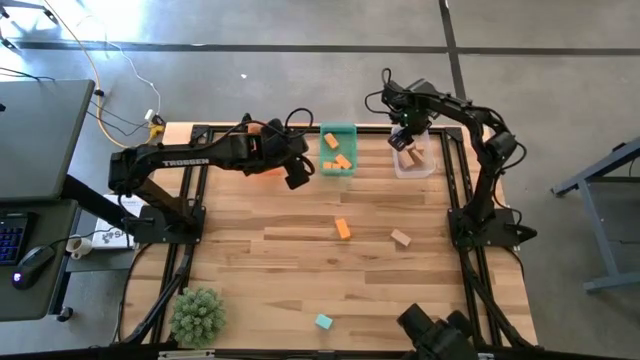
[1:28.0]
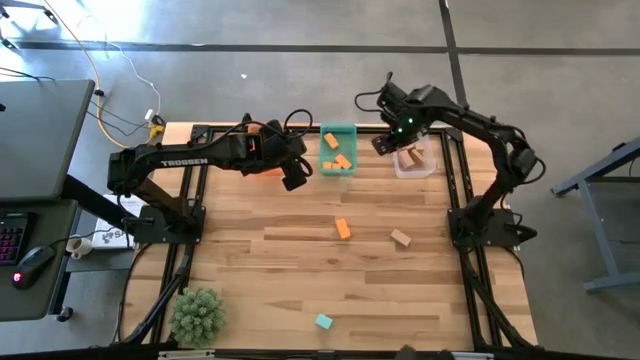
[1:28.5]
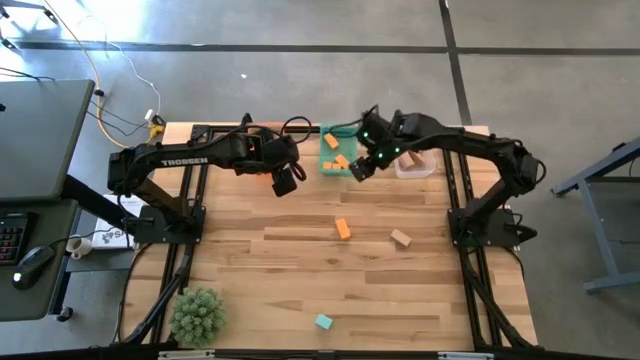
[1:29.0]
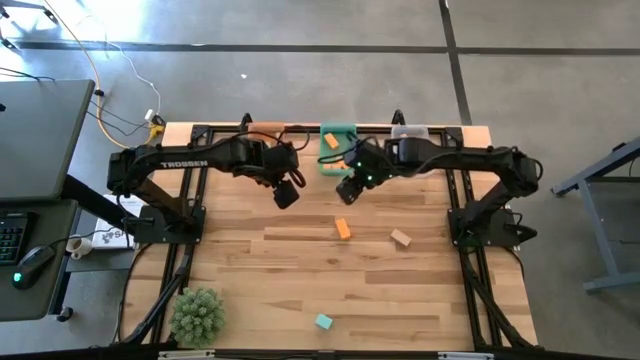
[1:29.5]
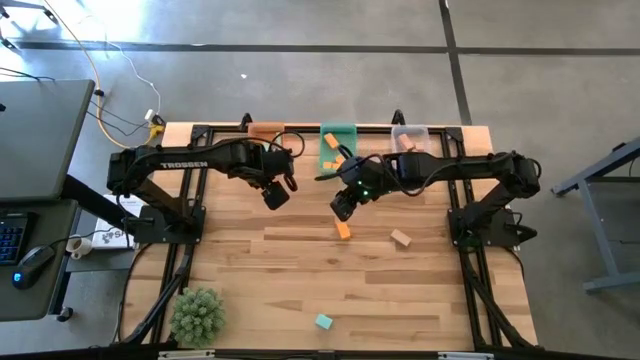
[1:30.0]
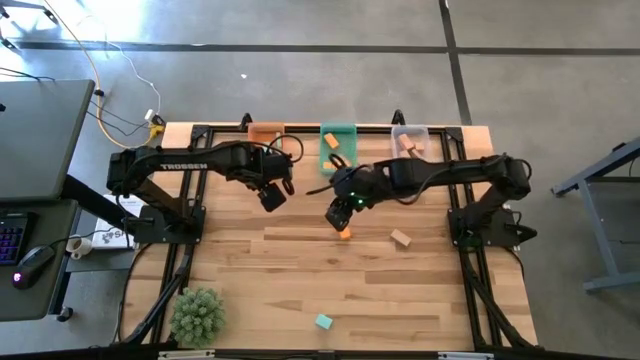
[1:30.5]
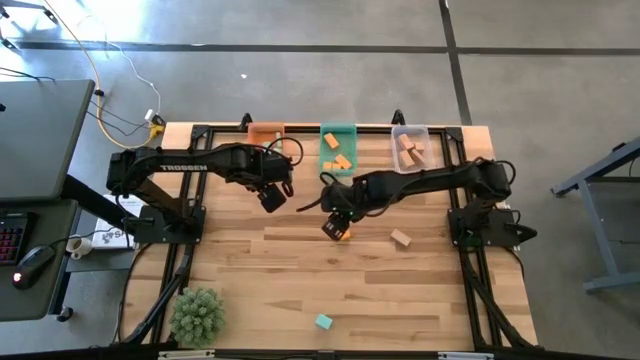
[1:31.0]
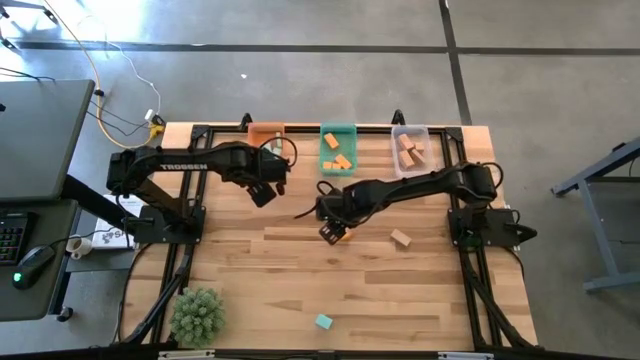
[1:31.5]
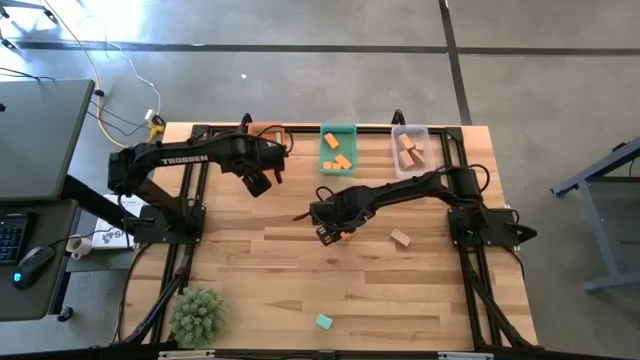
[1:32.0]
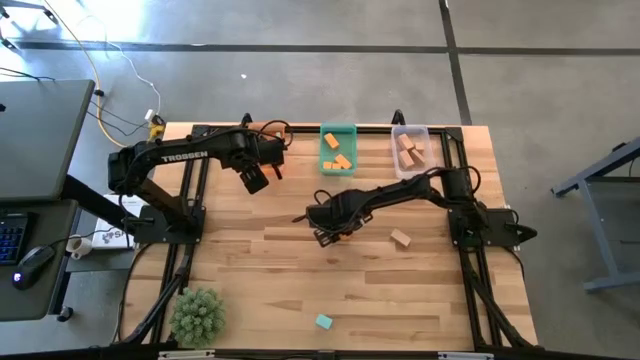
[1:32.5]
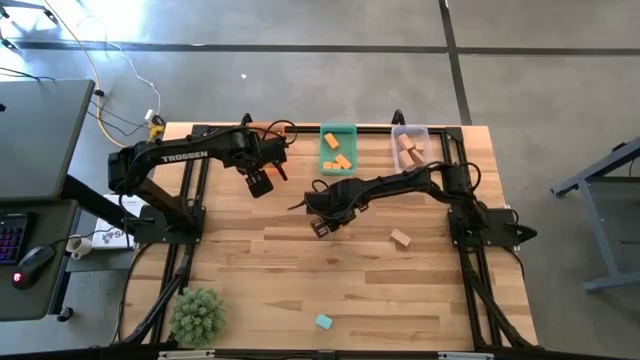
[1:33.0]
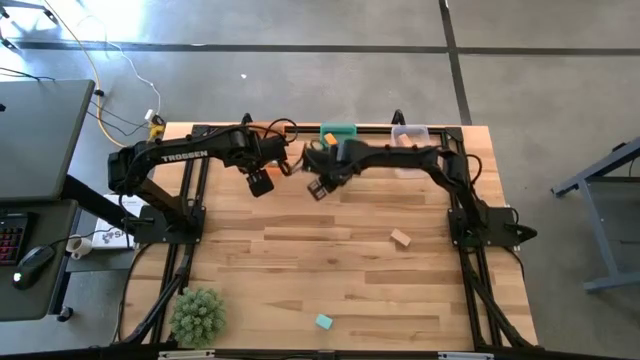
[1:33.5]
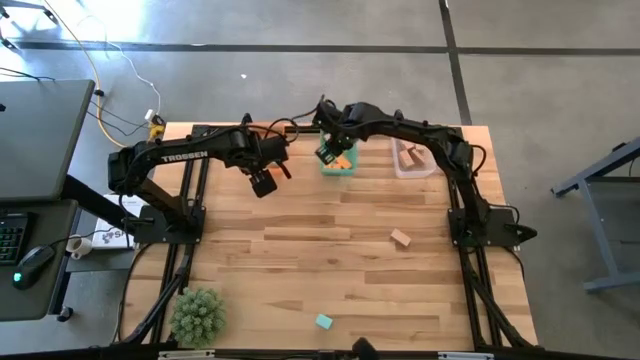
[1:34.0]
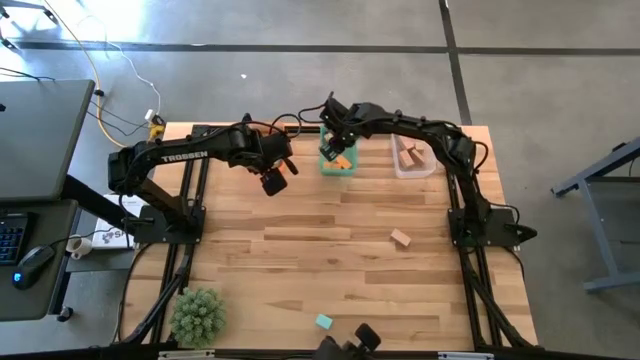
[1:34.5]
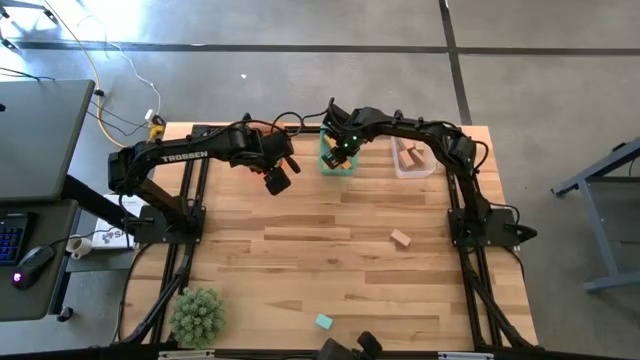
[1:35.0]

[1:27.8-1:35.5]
Task: Sort & place blocks by color
Put the yellow block into the blue bin

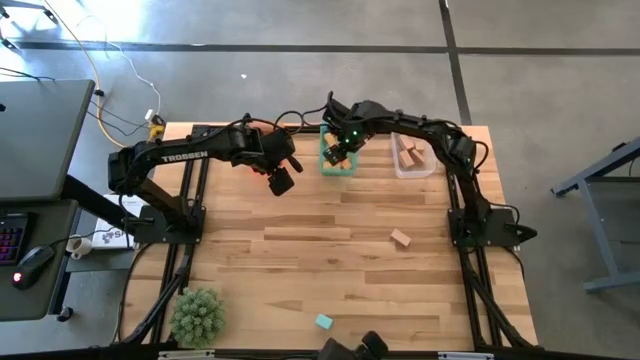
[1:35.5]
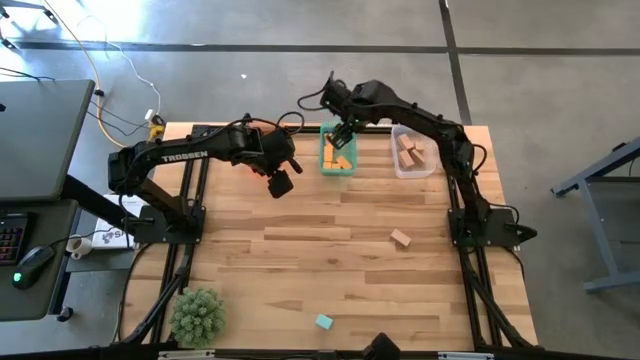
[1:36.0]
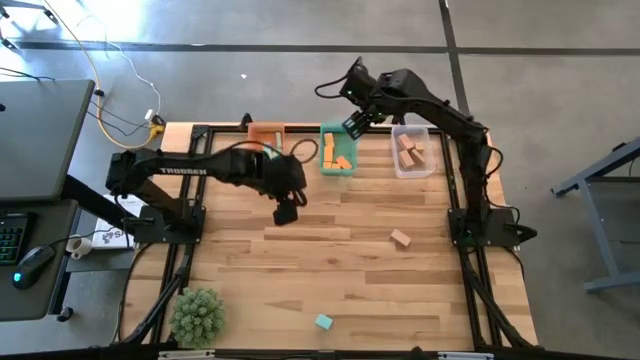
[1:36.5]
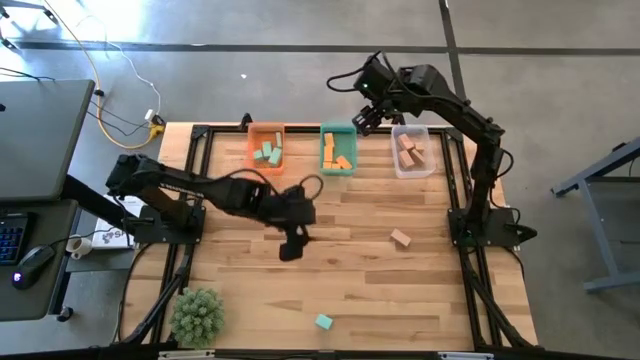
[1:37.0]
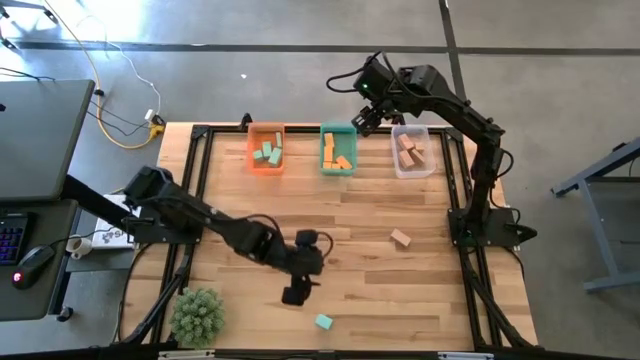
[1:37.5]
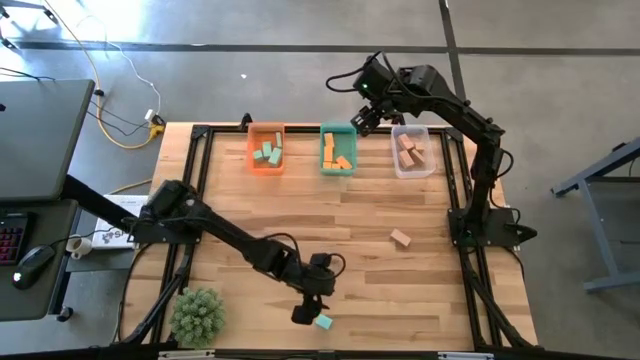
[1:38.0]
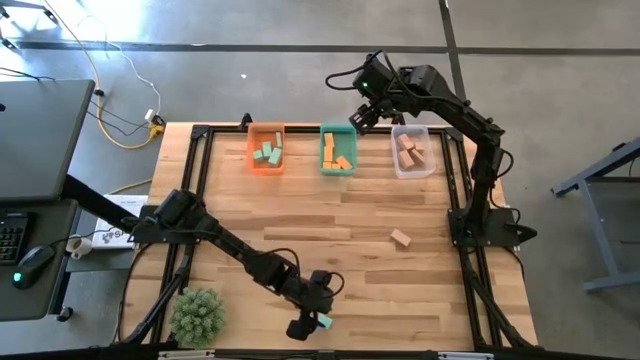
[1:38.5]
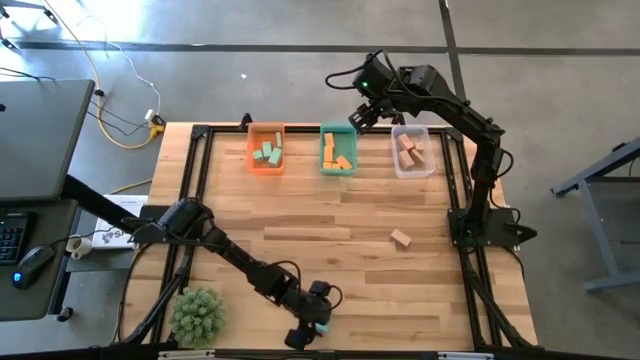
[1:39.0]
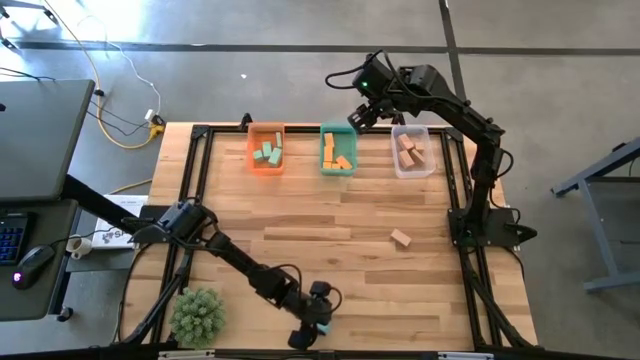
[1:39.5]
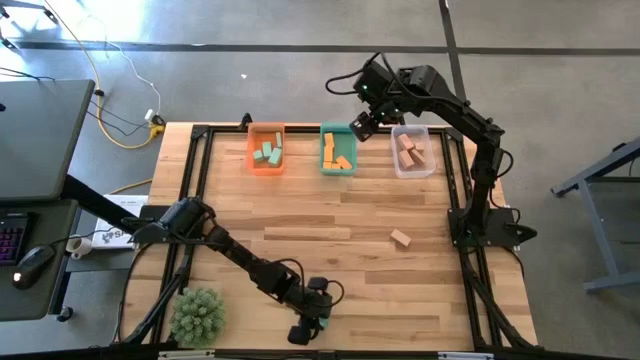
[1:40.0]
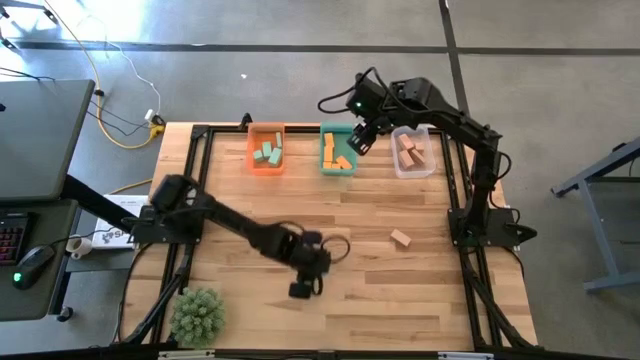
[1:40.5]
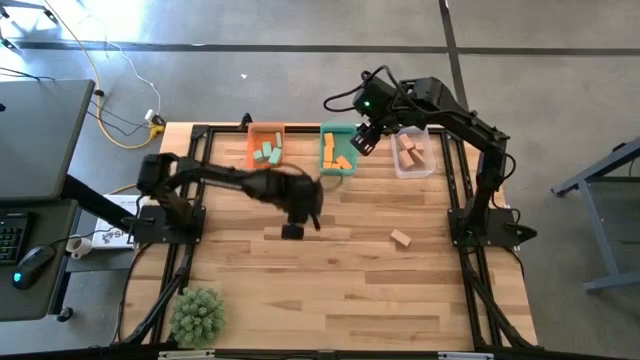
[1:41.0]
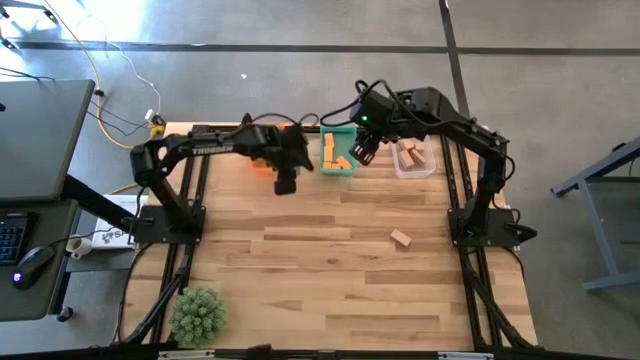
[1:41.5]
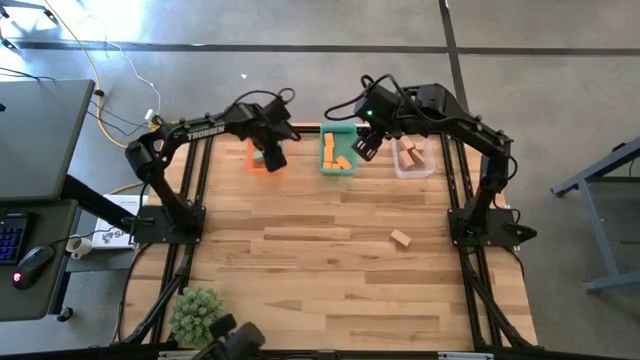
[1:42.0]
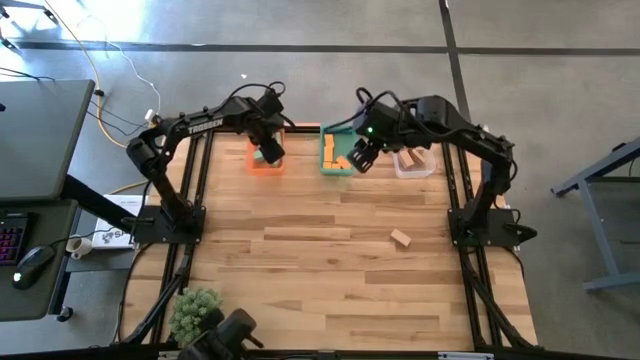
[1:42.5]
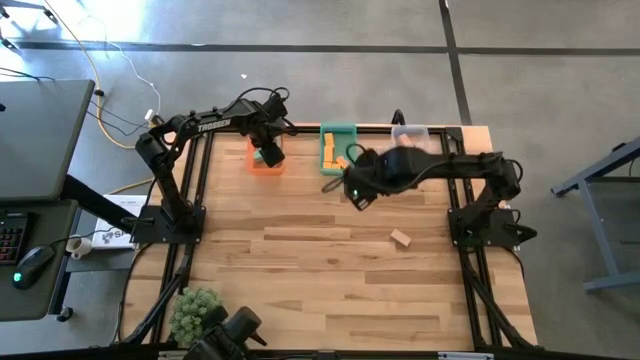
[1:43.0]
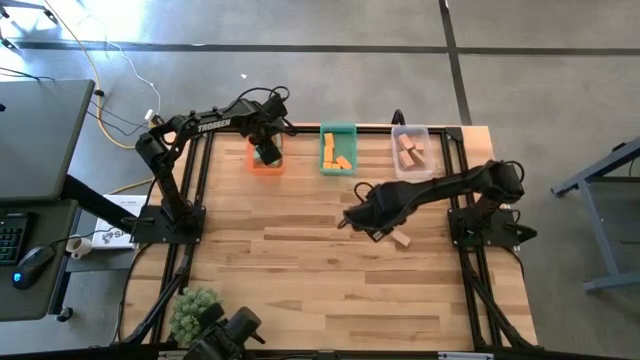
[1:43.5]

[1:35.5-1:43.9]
Put the light blue block into the orange bin

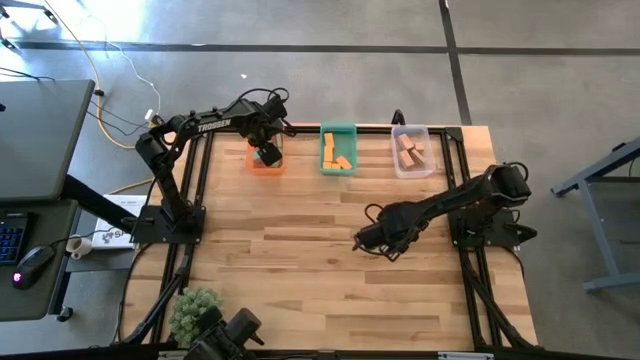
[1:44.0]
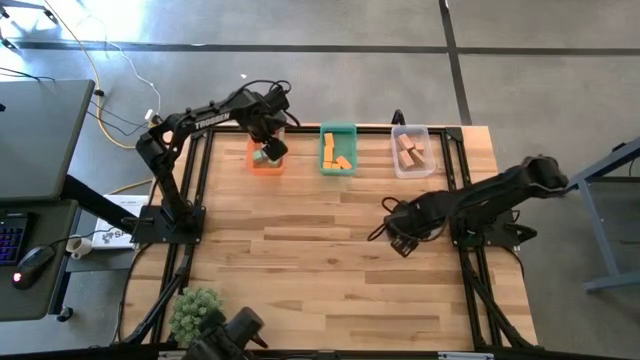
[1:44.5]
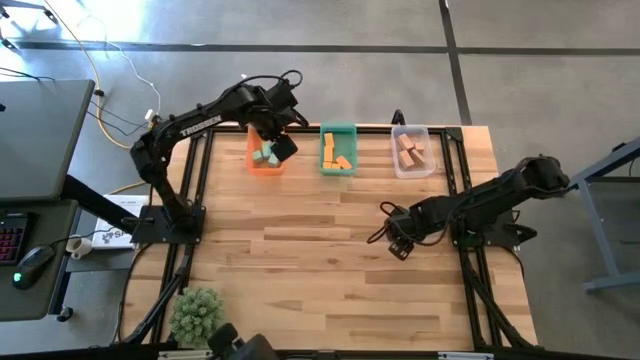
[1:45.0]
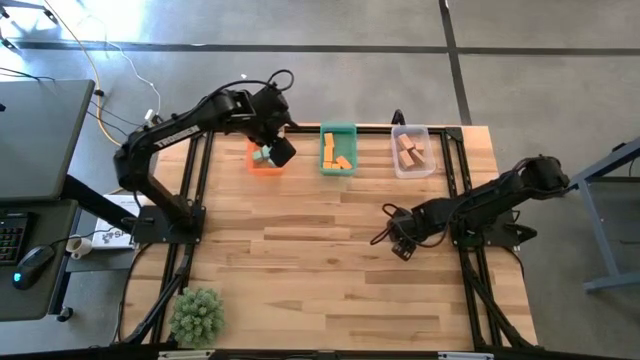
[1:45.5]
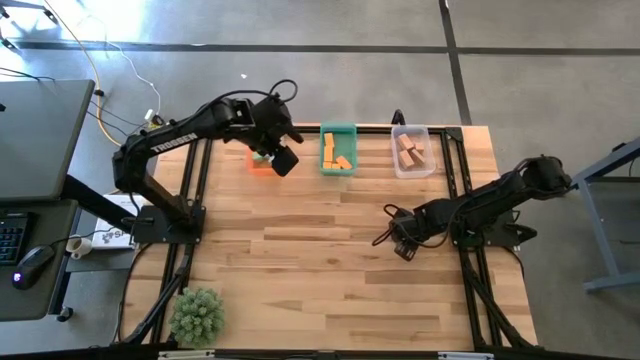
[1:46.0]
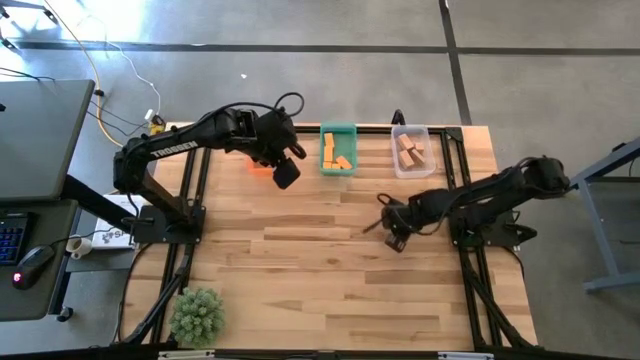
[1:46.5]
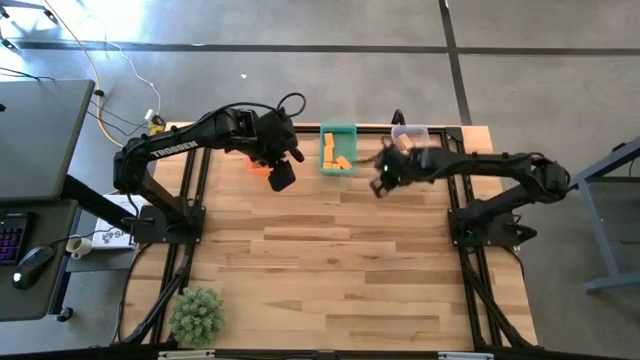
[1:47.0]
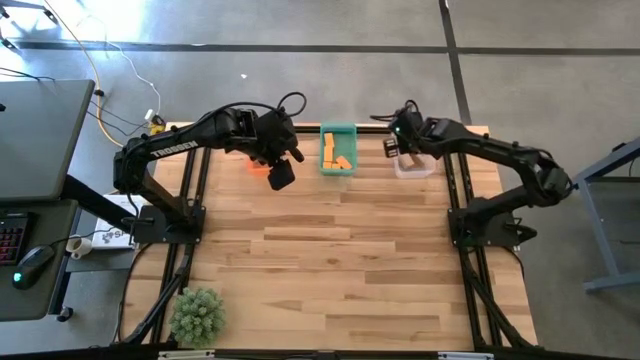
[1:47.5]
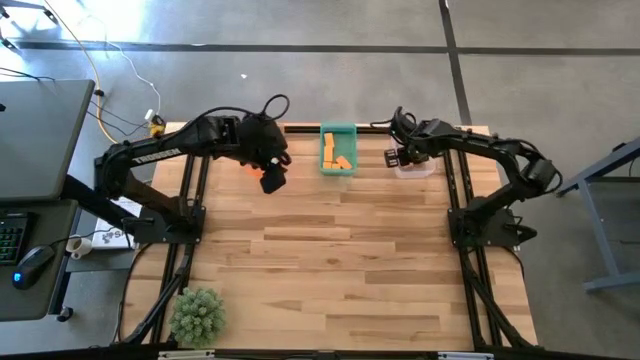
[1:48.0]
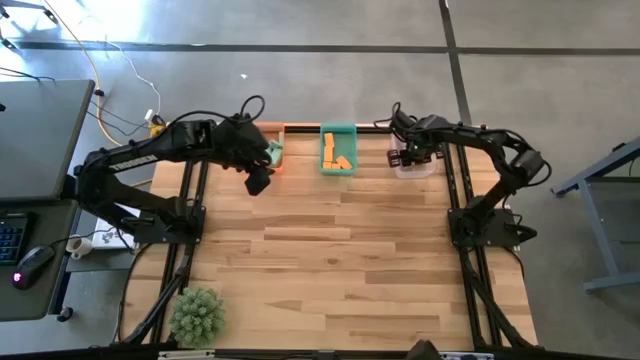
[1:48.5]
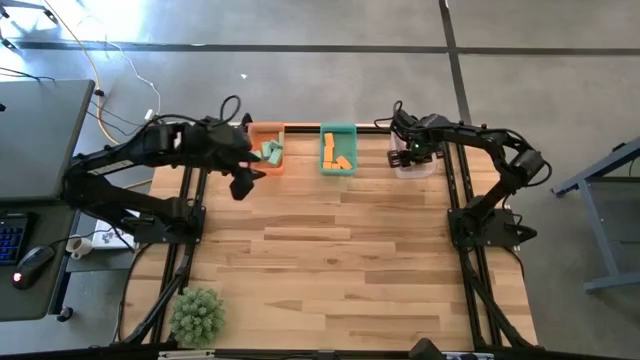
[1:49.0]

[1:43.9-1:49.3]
Put the brown block into the transparent bin
